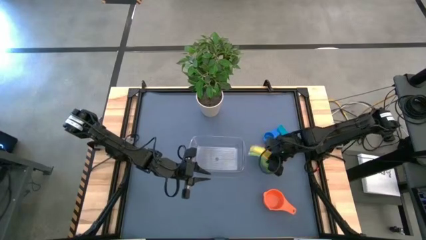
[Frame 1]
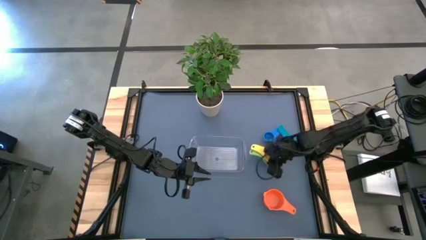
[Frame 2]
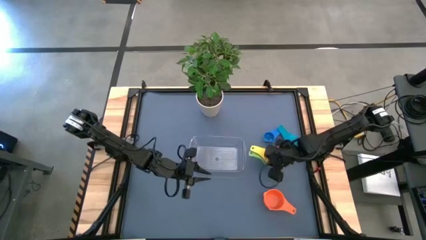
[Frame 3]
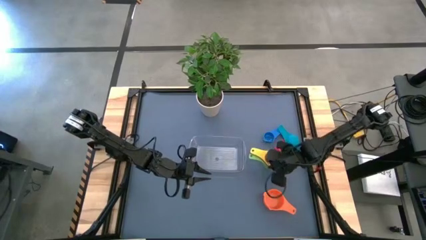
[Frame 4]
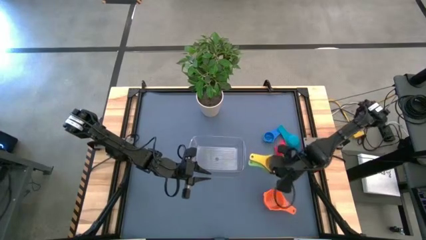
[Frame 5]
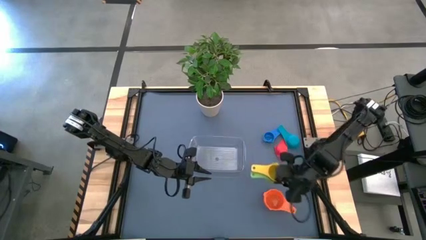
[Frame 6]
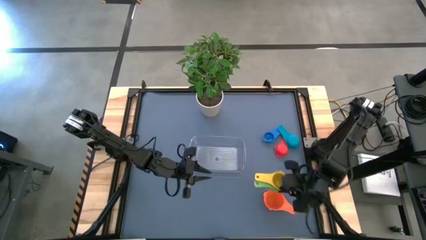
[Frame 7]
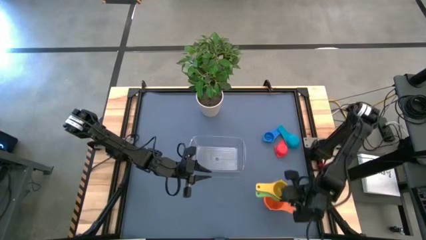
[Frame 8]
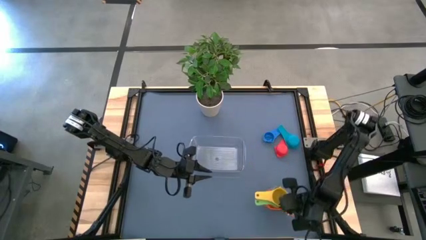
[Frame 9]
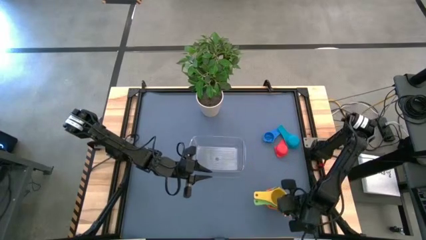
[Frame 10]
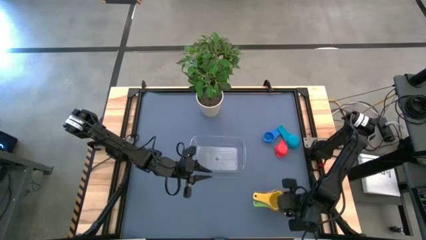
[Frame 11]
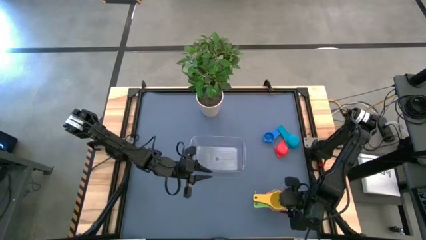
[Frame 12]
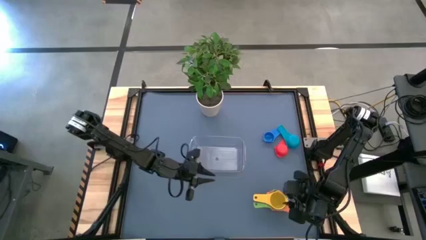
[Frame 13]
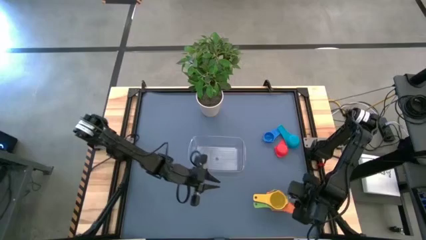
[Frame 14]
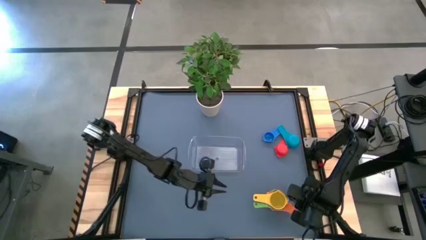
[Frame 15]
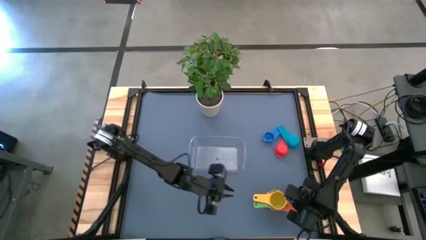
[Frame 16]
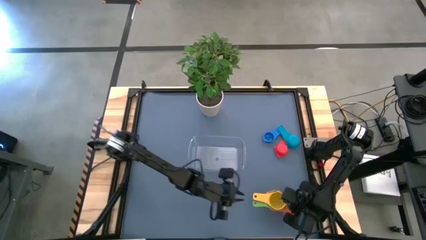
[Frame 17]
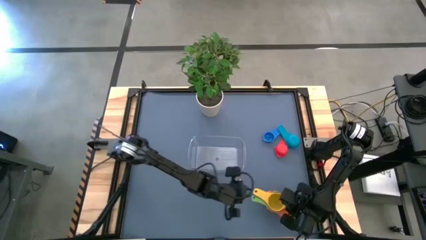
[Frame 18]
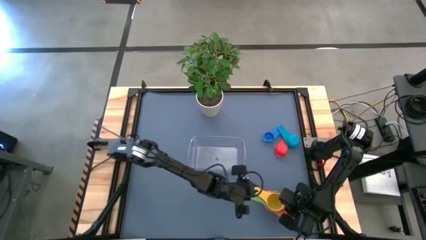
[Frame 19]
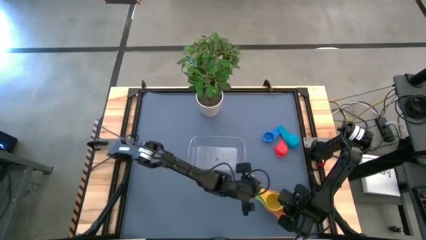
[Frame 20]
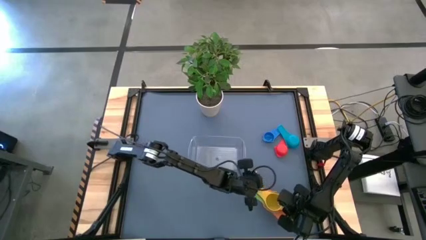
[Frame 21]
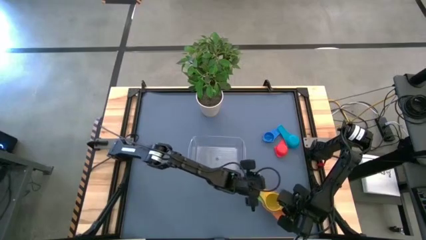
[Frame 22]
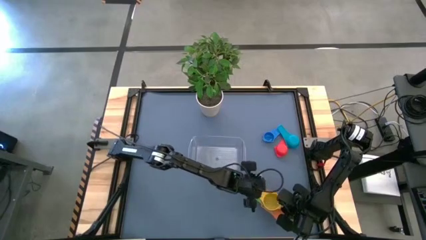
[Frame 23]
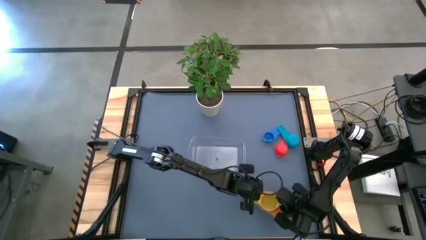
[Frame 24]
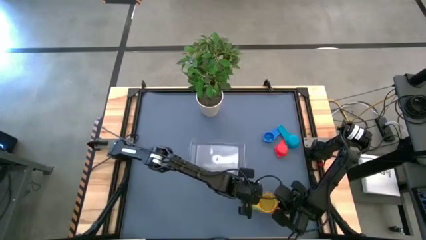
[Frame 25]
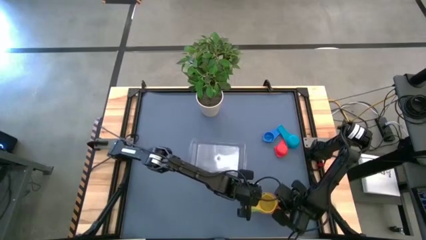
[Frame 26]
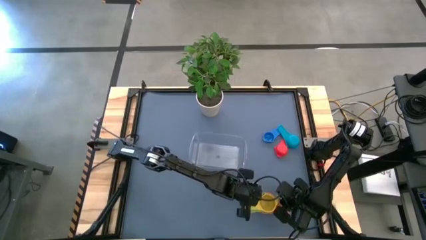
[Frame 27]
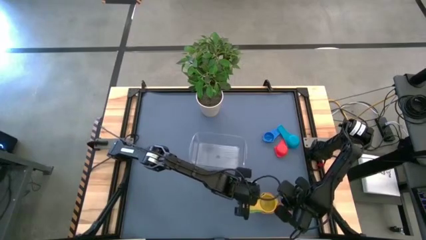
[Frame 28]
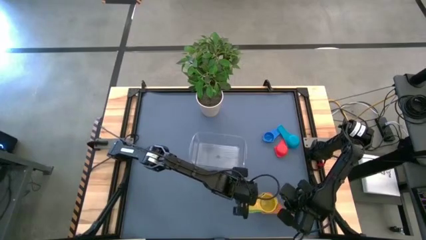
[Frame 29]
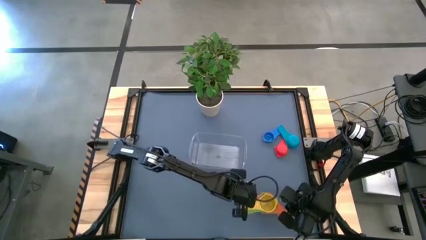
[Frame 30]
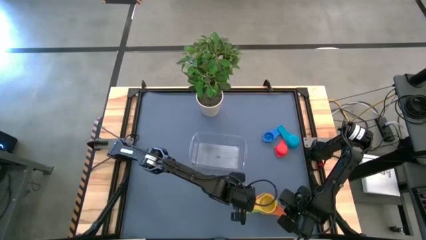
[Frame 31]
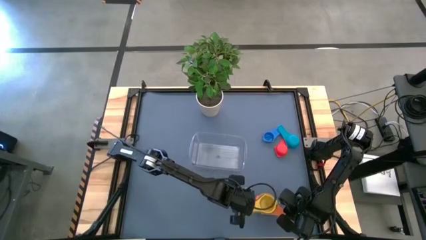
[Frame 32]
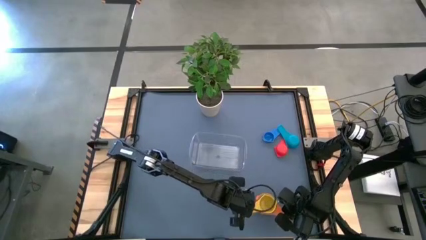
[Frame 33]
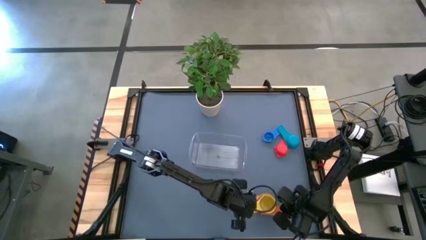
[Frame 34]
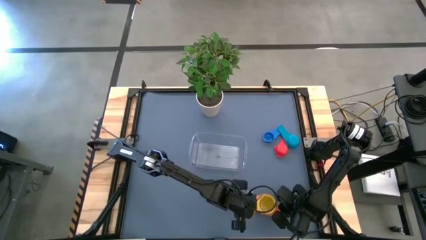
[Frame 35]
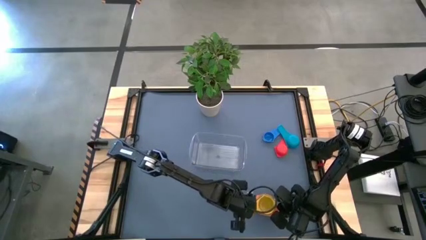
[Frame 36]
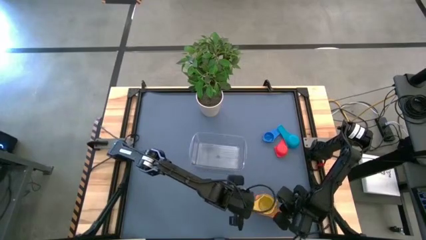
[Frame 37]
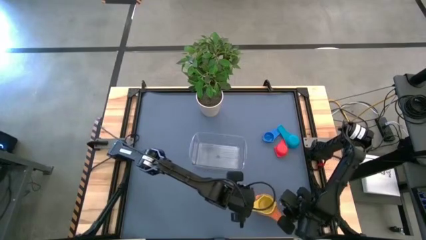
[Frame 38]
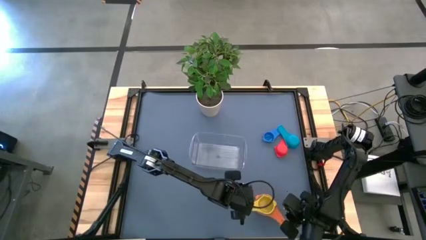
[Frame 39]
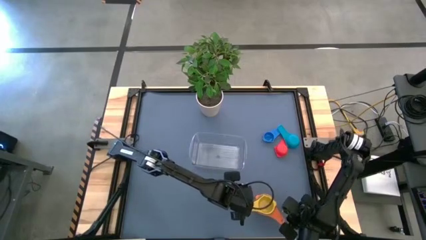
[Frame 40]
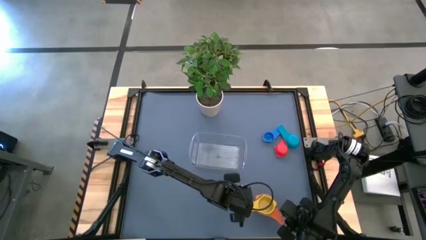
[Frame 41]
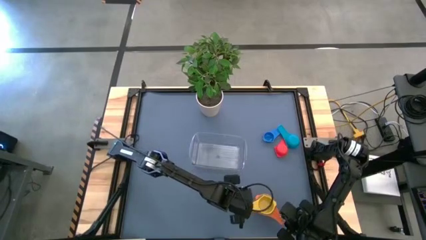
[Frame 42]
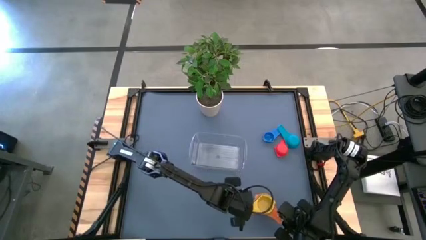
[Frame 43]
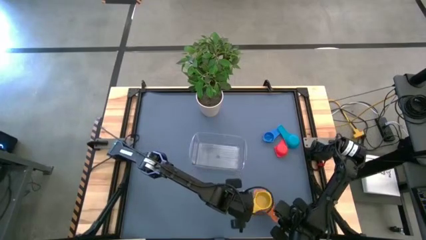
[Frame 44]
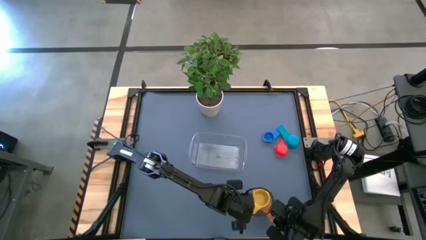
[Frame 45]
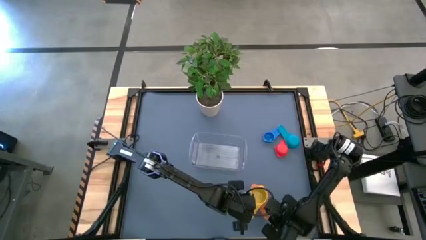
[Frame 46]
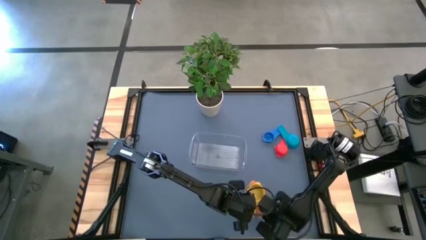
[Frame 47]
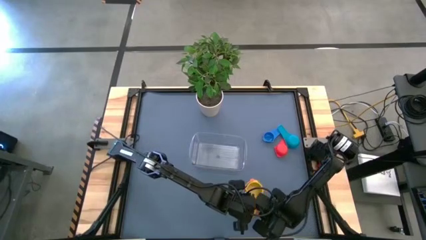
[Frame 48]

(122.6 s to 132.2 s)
Task: Nest measuring cups in basket
Stack the stacked measuring cups on top of the orange measuring

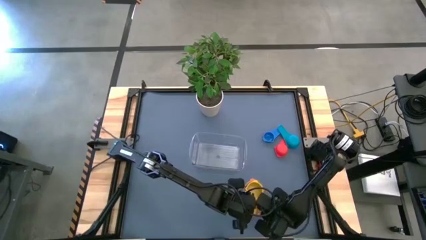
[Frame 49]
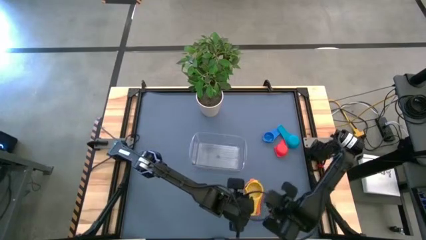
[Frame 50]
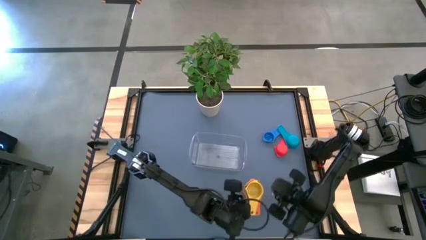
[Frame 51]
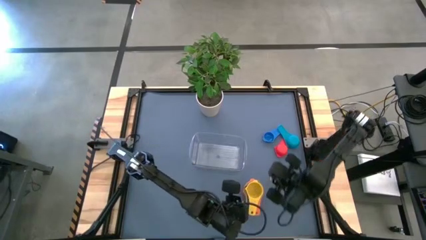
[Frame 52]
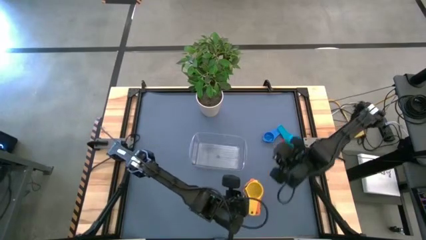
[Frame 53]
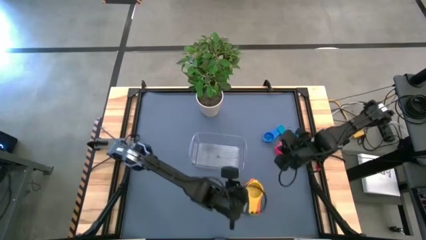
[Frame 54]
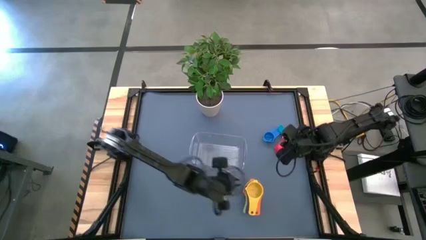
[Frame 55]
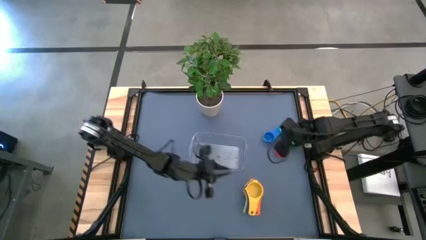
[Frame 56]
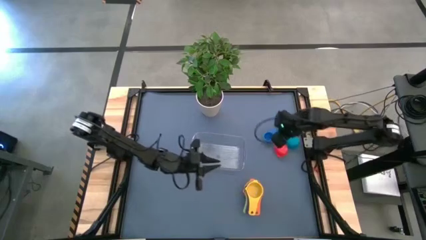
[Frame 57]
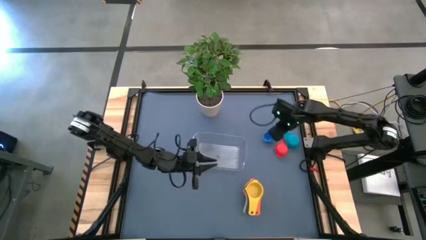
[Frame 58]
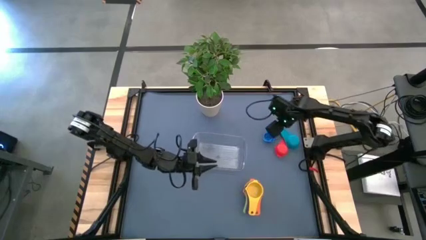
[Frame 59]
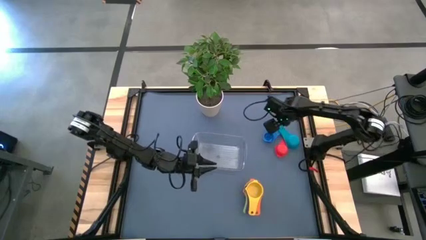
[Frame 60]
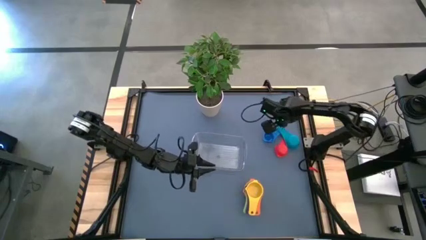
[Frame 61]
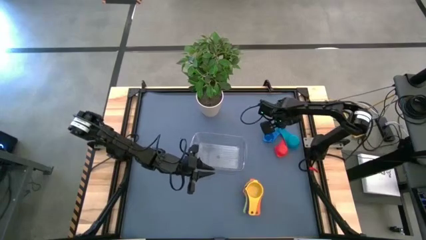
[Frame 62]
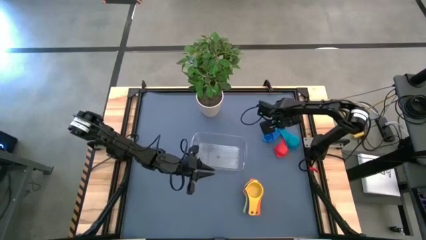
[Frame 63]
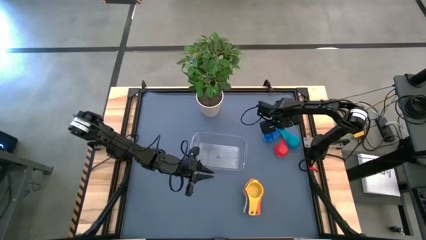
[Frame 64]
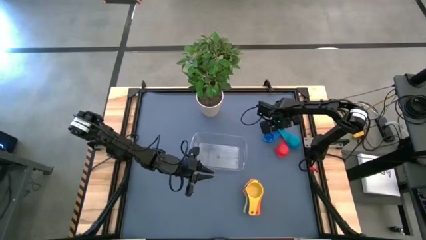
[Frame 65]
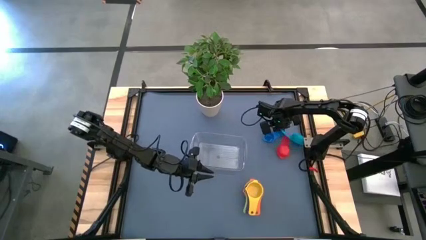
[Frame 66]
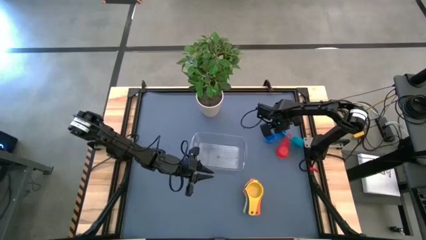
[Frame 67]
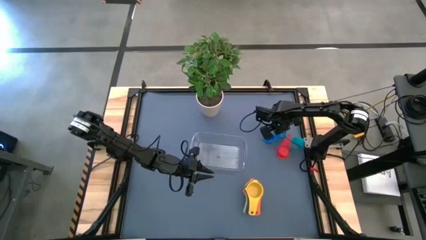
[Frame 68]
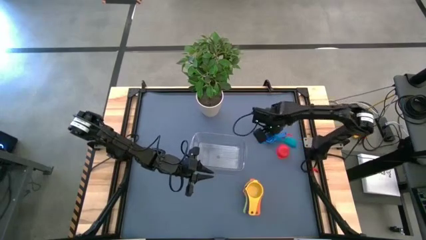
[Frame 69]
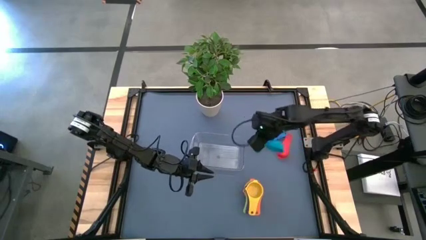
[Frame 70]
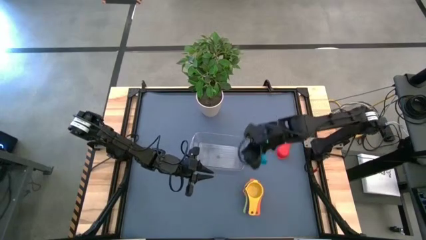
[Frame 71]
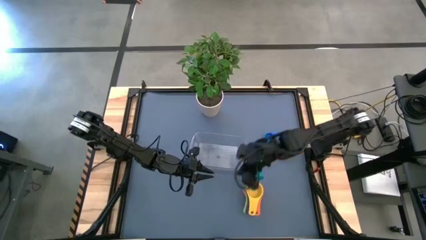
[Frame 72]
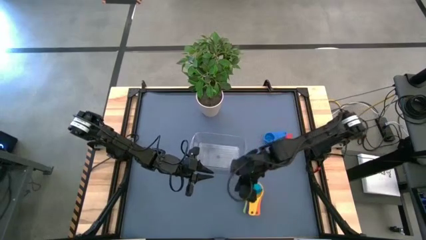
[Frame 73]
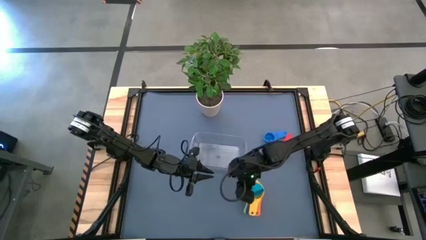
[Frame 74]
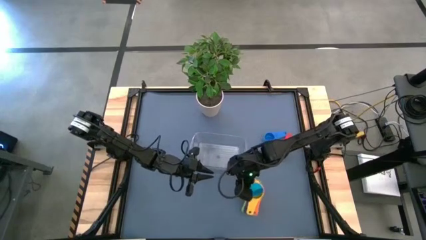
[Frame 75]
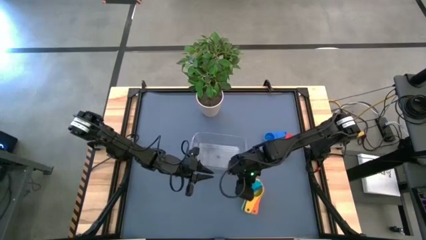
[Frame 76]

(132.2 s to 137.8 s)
Stack the light blue measuring cup on top of the yellow measuring cup
